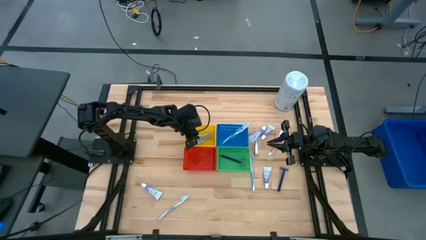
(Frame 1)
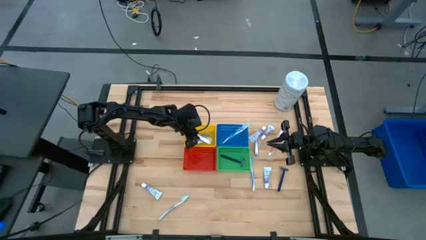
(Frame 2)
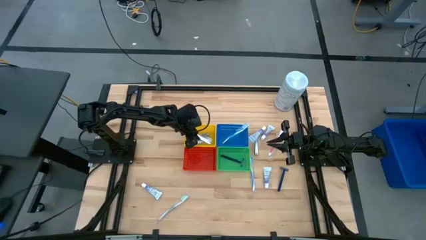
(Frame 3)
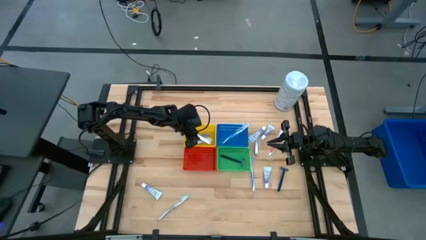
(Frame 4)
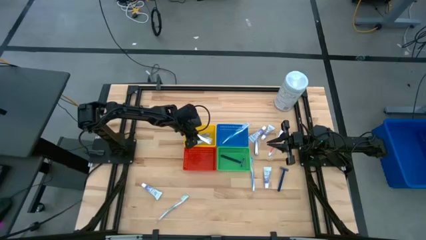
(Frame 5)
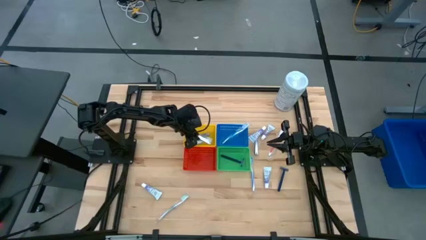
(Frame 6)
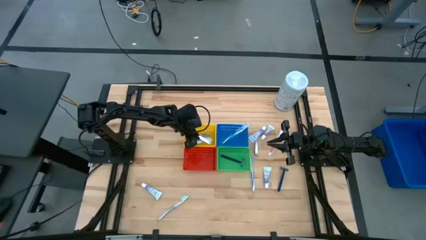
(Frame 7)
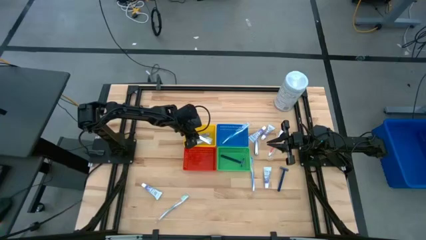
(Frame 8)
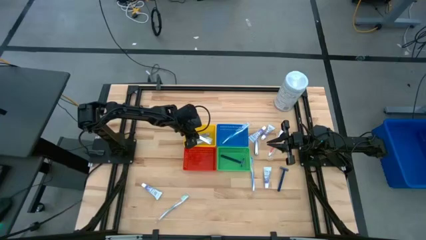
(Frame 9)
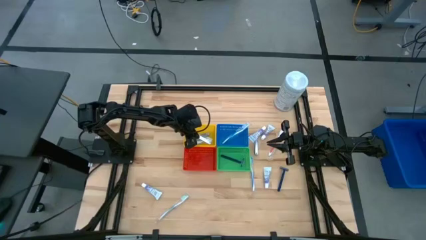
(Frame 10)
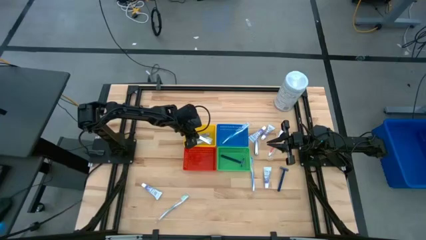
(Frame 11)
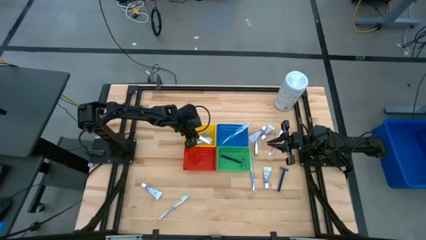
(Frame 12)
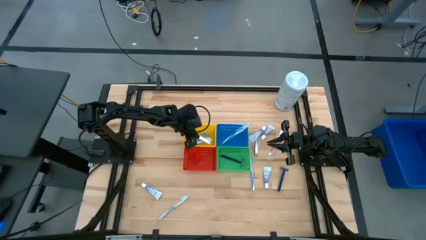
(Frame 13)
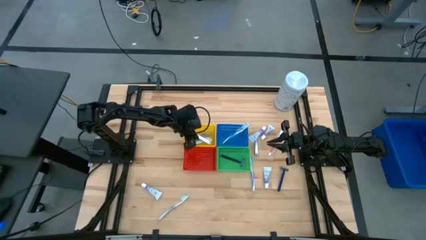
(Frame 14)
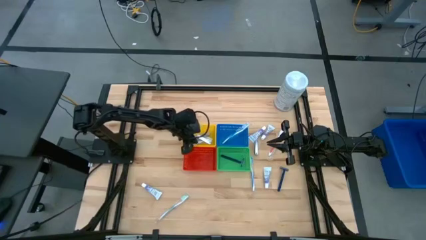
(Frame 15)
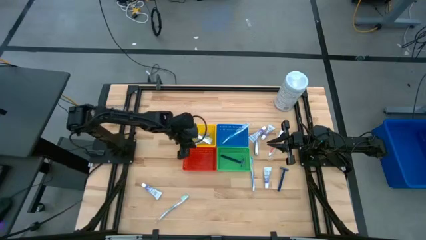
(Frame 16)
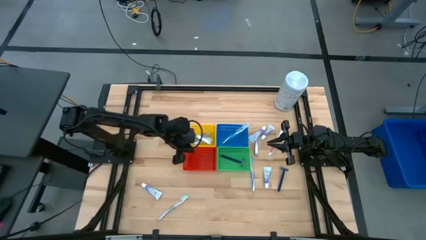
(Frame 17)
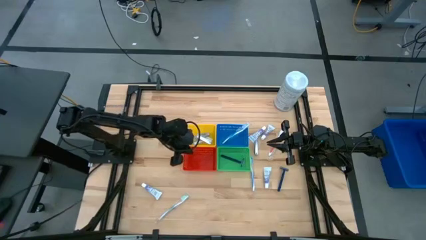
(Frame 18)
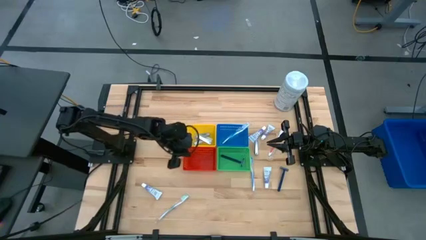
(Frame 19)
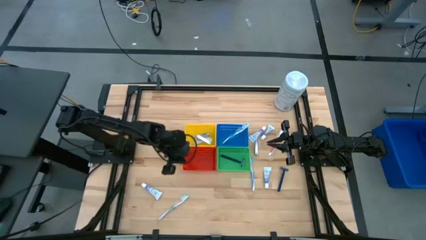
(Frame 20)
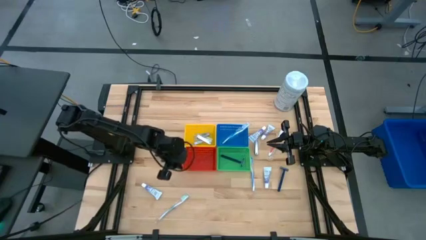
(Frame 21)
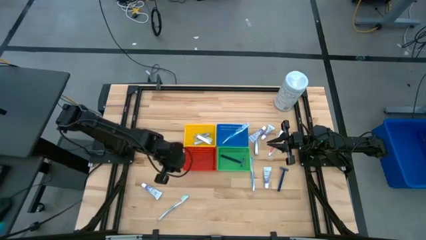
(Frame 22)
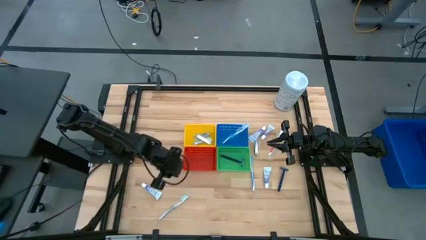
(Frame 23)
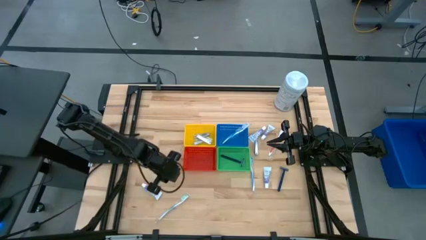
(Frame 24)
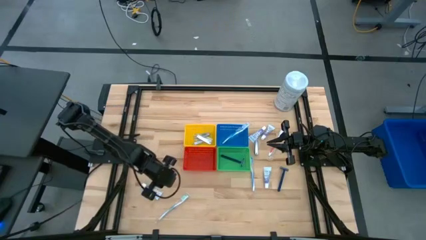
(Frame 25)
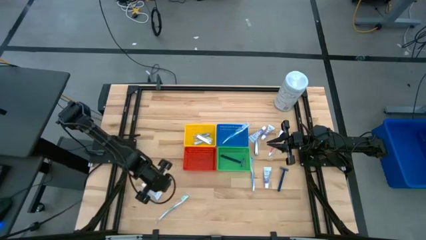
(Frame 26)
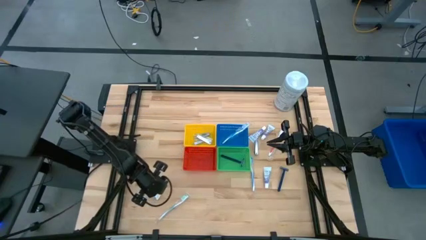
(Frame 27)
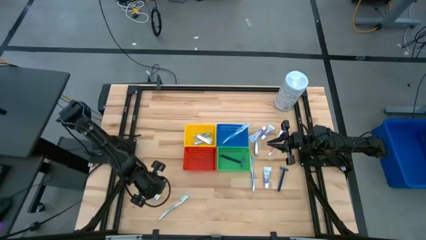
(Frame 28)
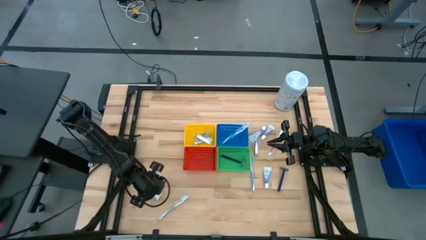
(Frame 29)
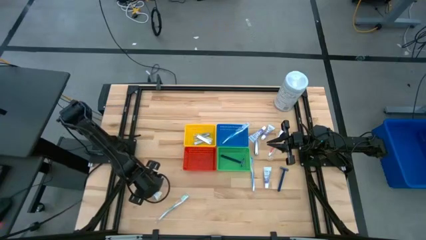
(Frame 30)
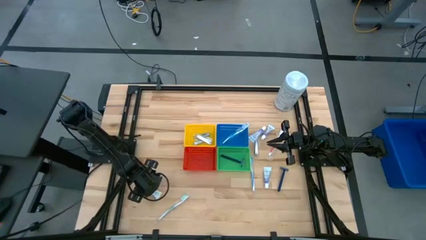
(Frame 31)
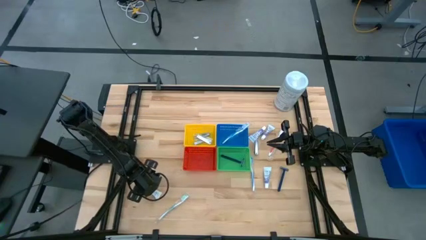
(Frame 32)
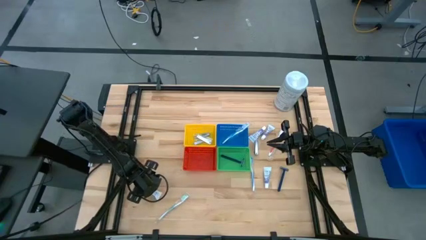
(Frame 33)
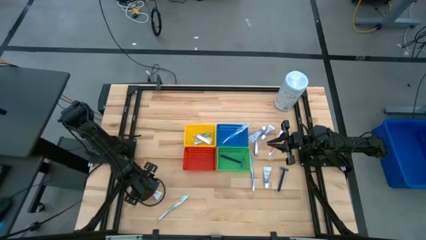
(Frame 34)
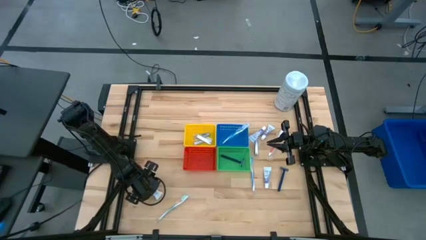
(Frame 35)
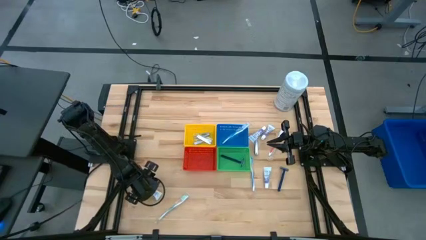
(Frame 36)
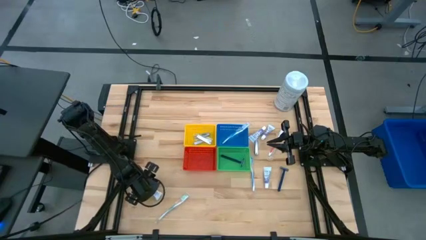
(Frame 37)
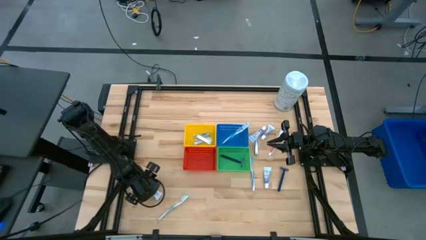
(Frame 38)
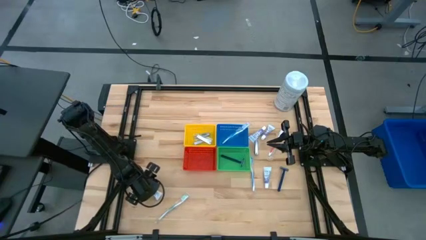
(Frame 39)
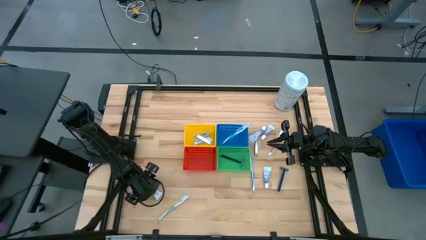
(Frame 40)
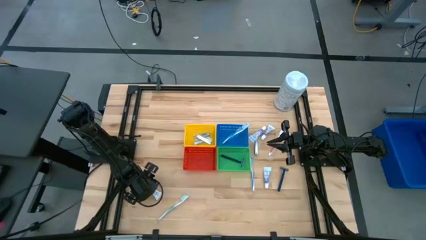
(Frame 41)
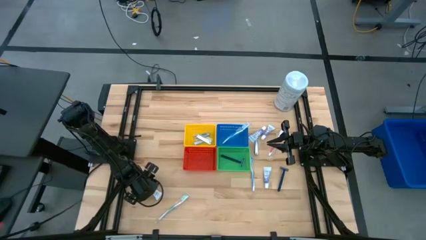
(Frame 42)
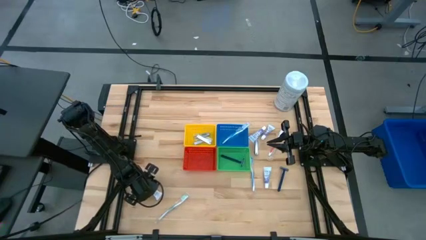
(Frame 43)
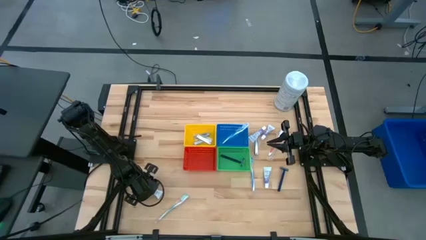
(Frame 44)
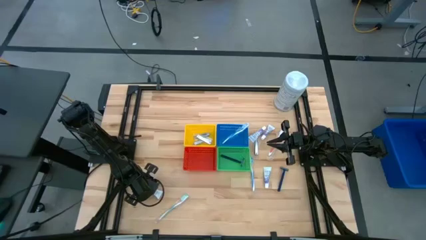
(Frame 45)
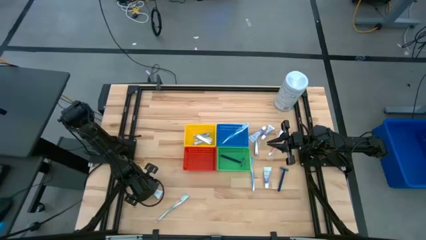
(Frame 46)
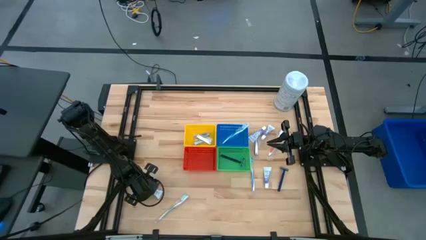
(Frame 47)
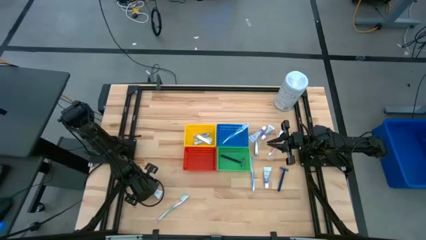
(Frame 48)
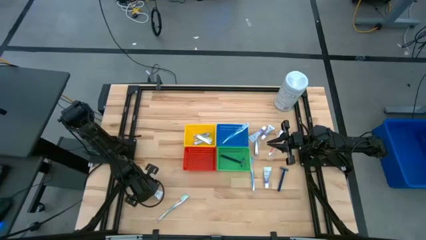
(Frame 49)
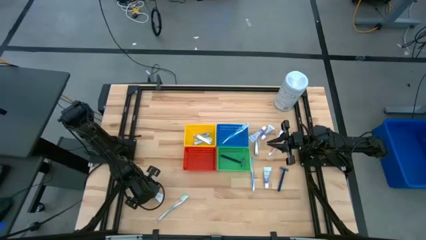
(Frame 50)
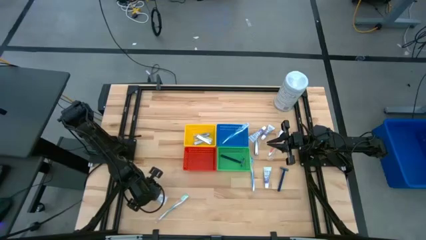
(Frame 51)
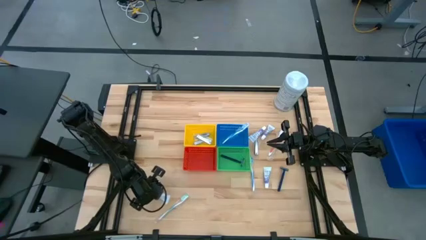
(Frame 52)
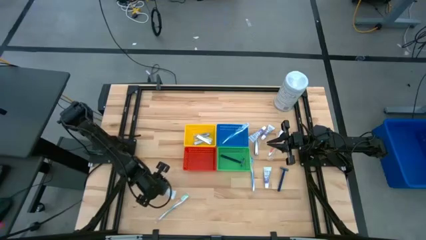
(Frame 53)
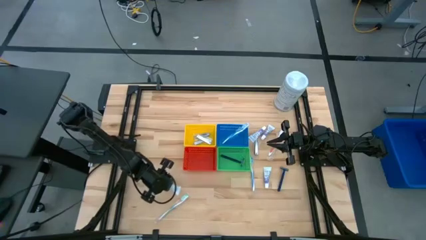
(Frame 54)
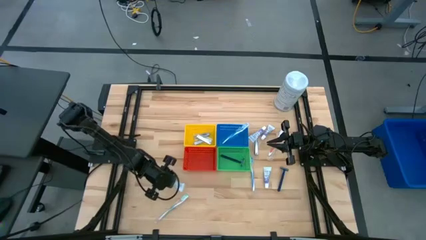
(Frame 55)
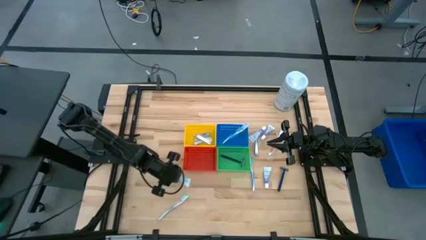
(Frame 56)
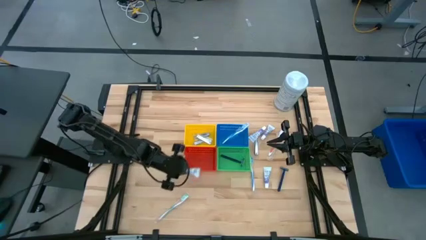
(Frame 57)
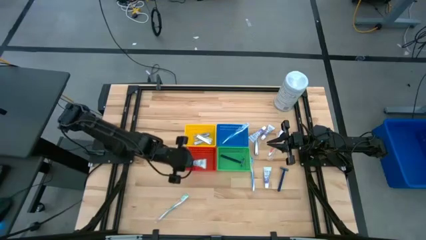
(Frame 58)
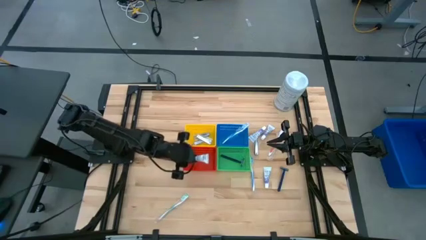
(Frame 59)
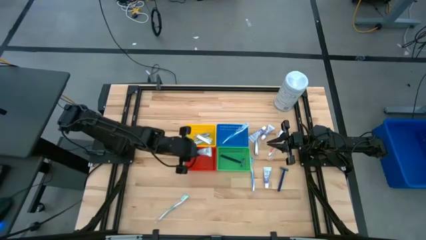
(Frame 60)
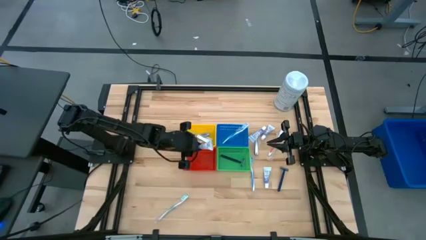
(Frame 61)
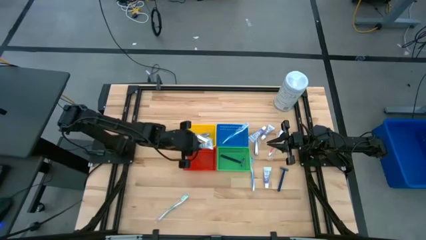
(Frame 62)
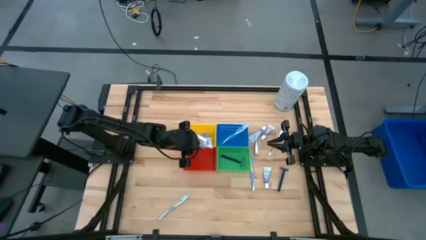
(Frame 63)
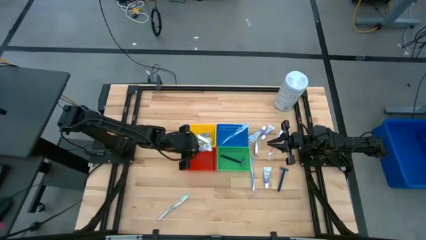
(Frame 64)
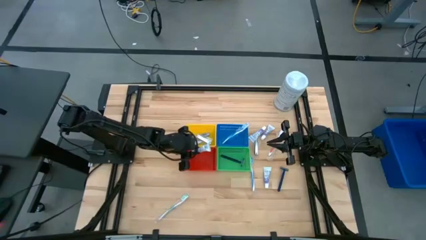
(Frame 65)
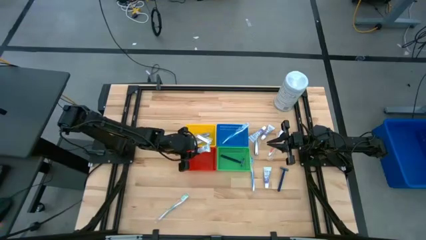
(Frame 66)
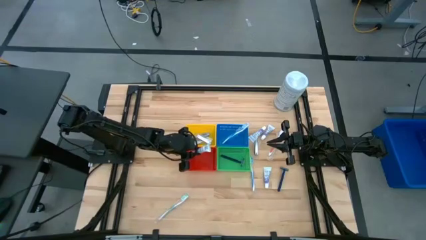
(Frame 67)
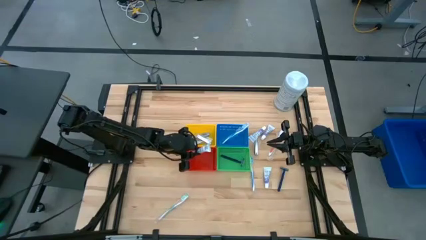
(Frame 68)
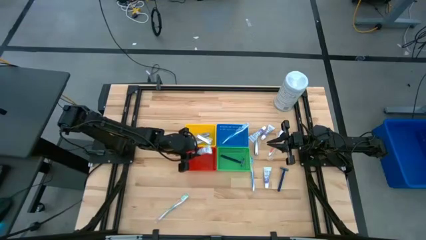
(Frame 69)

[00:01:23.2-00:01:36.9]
Task: Pick & Place Travel size toiletries
Put the bottom left toothpaste into the red bin

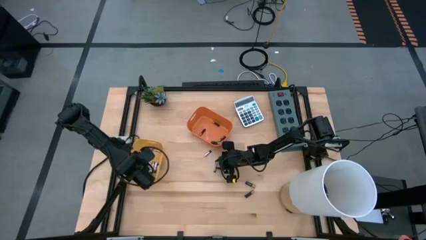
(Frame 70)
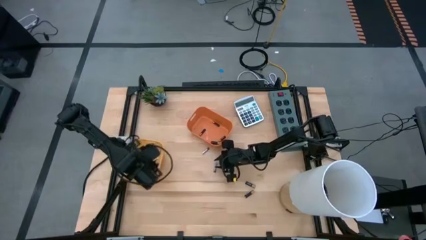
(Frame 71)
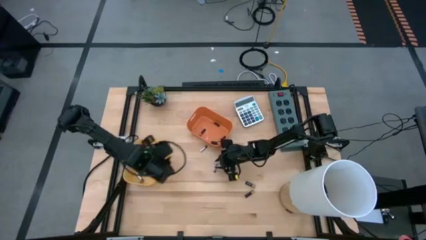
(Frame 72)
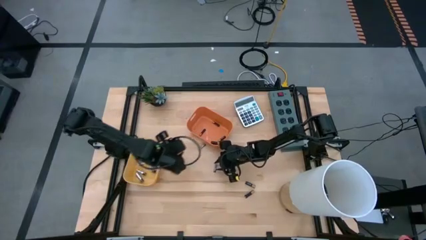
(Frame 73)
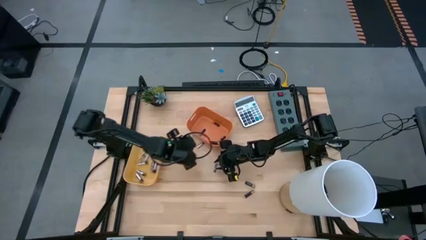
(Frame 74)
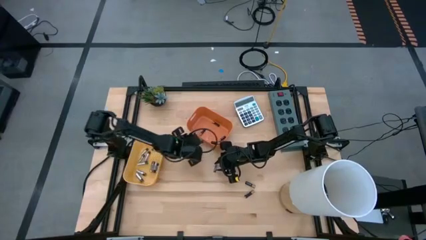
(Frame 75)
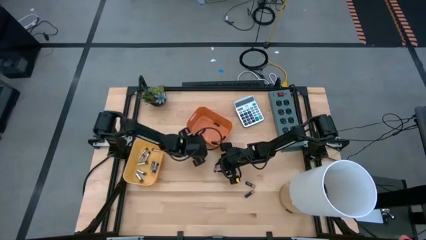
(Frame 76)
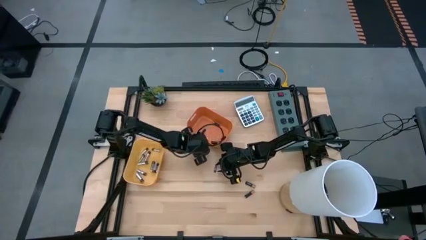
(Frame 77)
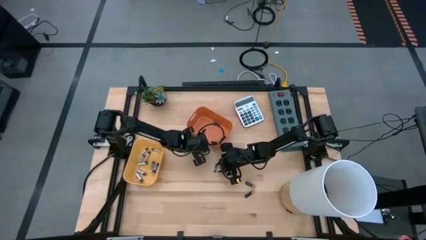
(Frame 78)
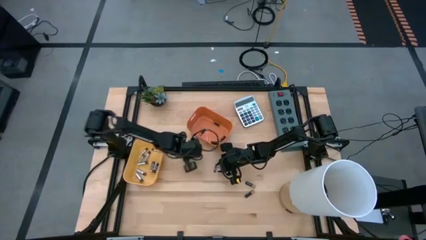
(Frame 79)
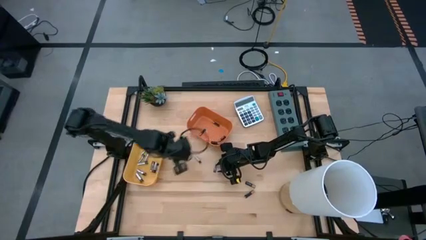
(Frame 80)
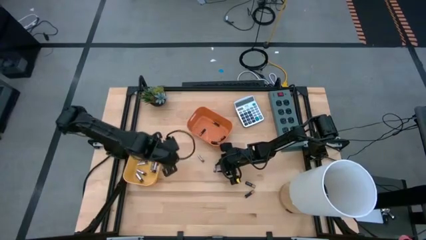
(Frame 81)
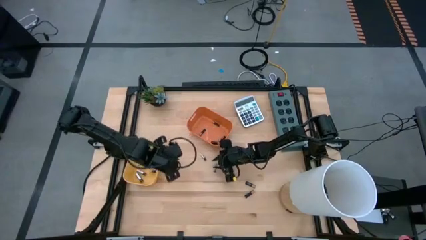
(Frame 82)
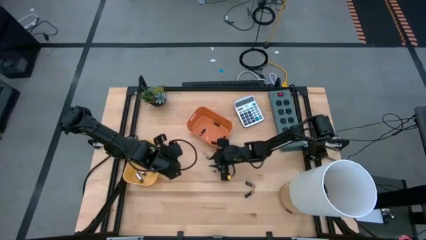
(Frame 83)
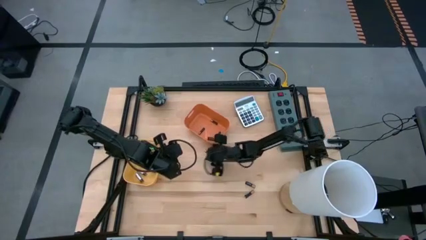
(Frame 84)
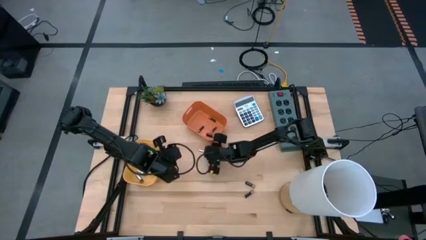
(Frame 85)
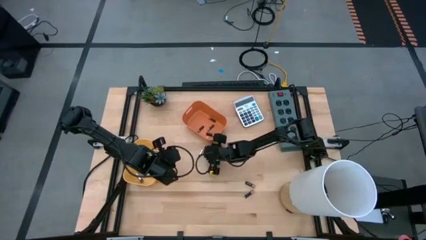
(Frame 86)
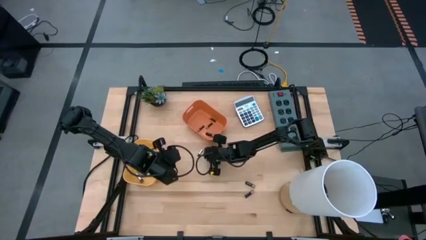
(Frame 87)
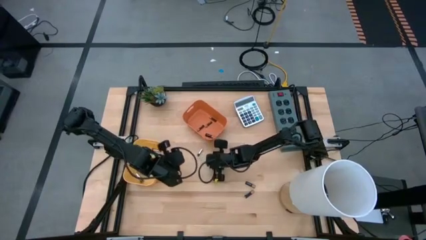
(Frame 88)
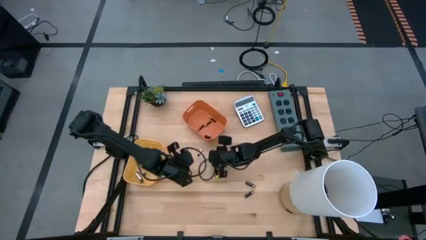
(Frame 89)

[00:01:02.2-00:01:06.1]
Task: Sort batteries
Put the silver battery into the yellow bin
